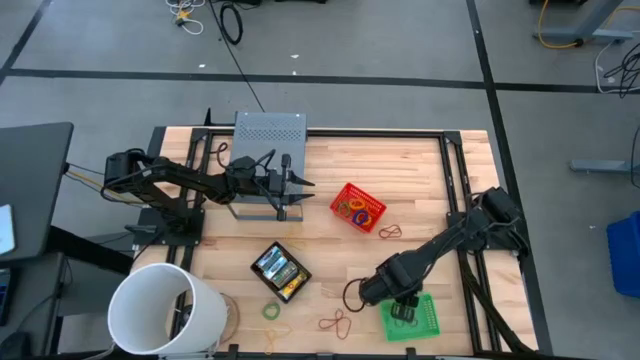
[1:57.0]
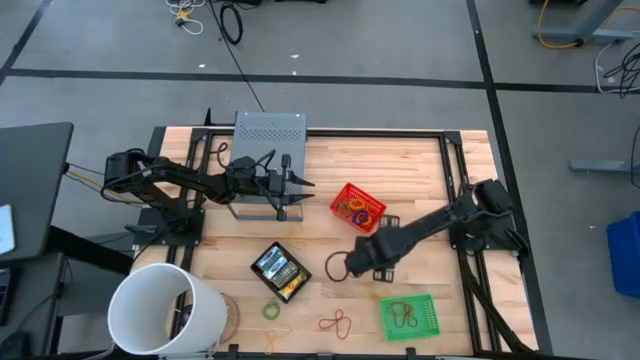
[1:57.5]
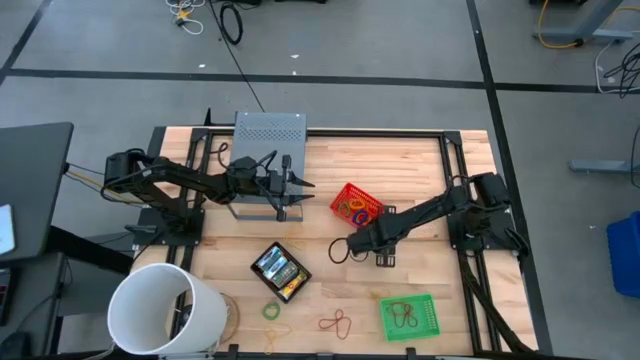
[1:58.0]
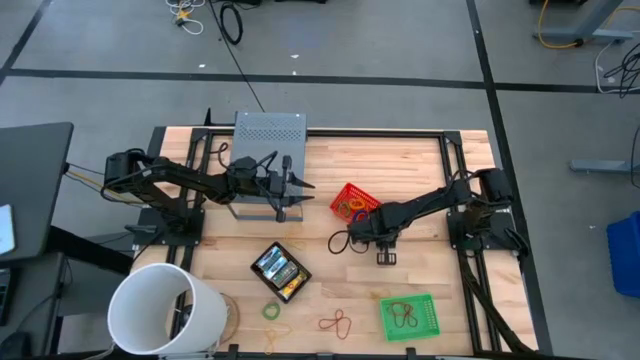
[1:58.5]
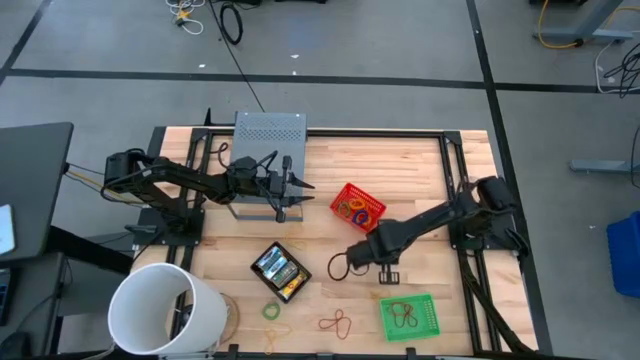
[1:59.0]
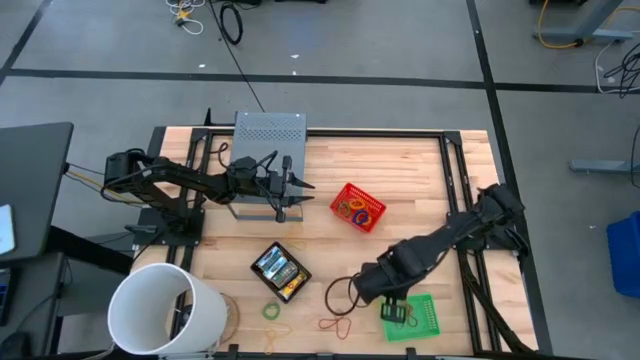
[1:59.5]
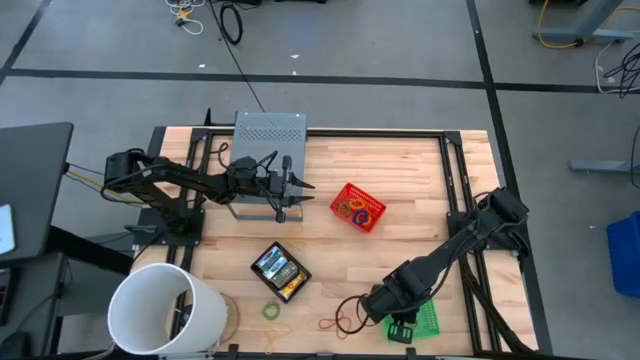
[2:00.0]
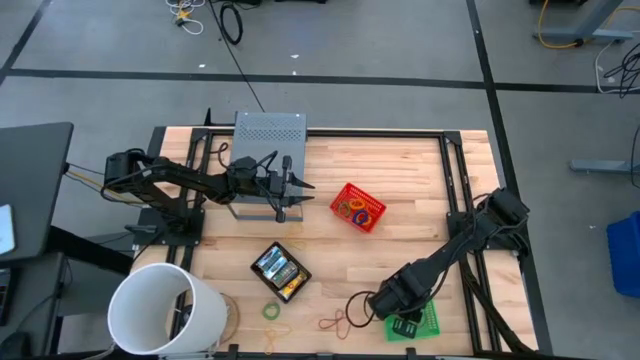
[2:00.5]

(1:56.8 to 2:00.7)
Task: Pick & Place Office Desk Supplies
Put the top red rubber band into the green basket

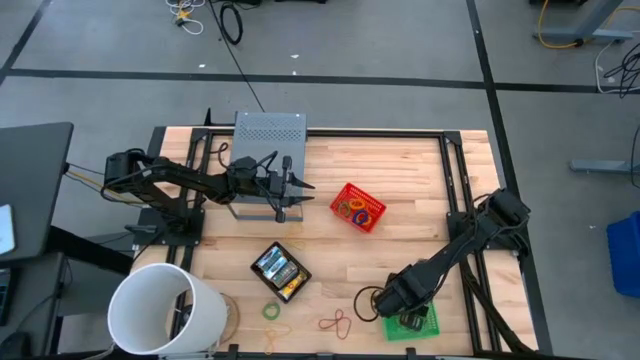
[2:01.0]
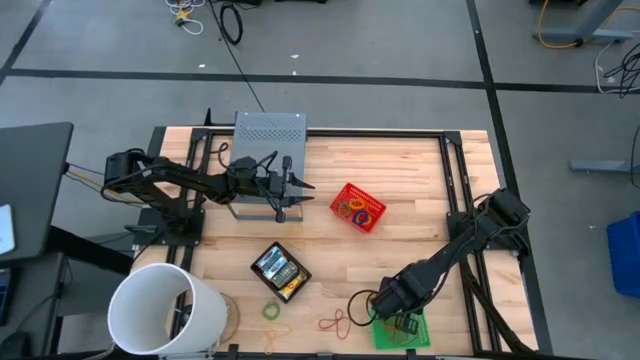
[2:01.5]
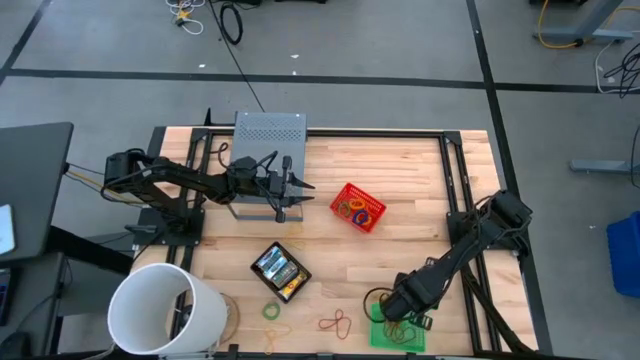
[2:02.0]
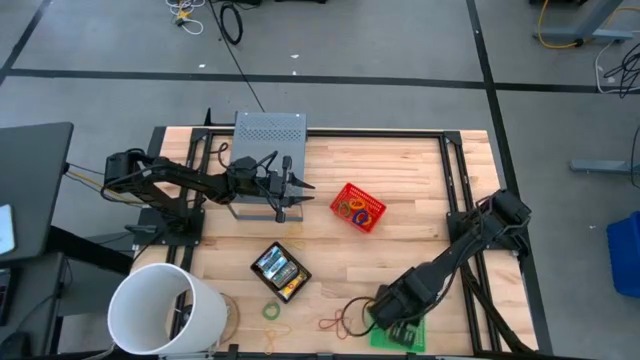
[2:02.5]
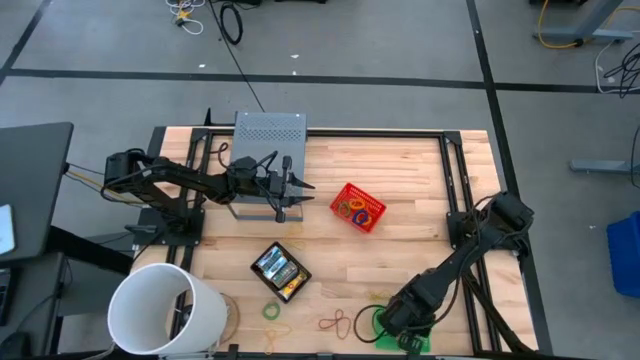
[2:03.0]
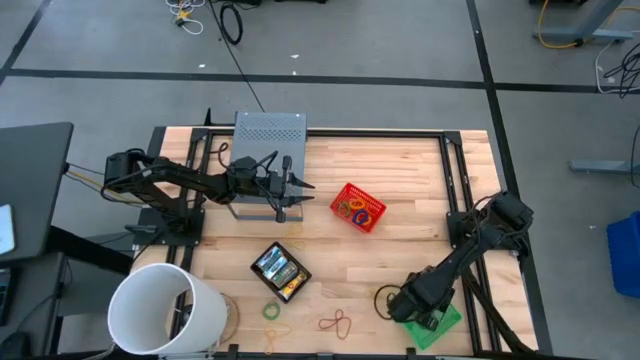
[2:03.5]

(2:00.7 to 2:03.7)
Adjust the green basket on the table

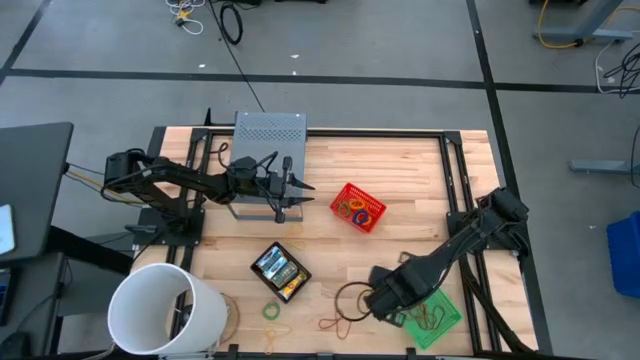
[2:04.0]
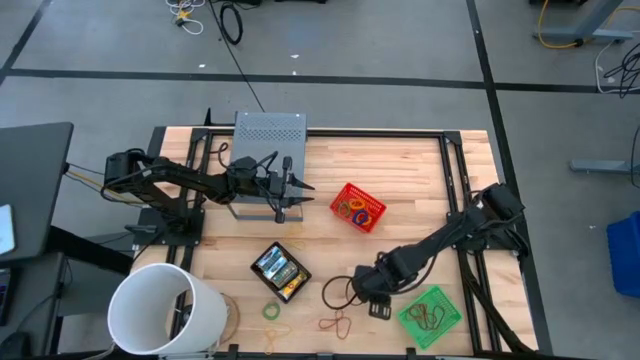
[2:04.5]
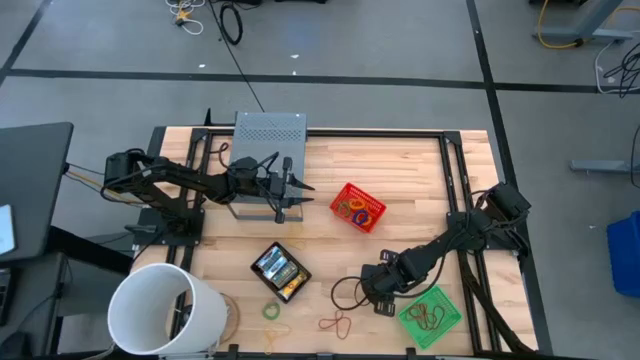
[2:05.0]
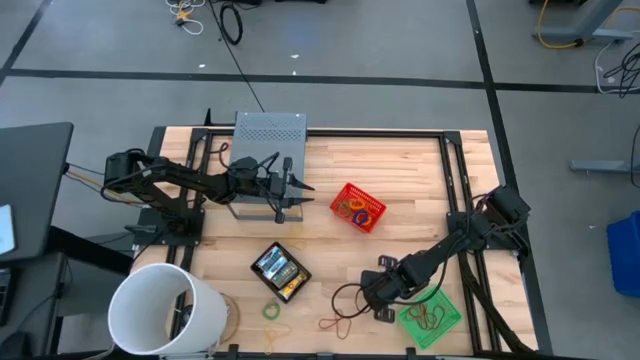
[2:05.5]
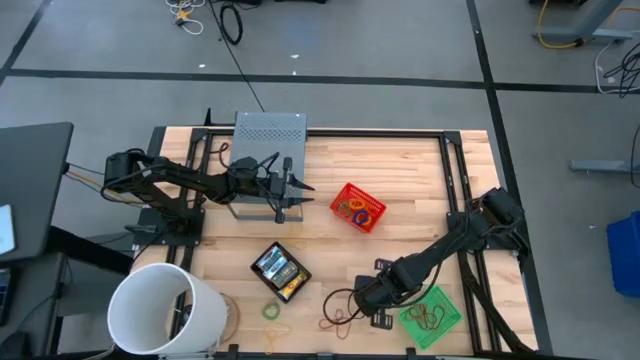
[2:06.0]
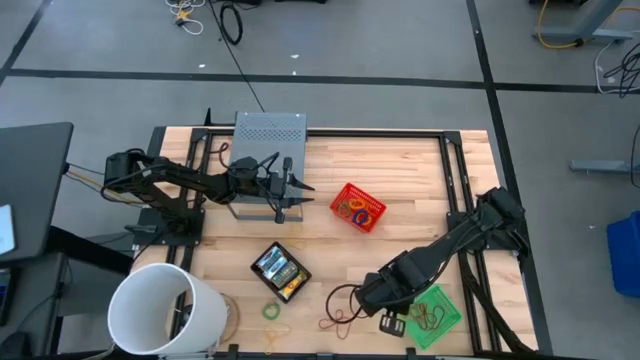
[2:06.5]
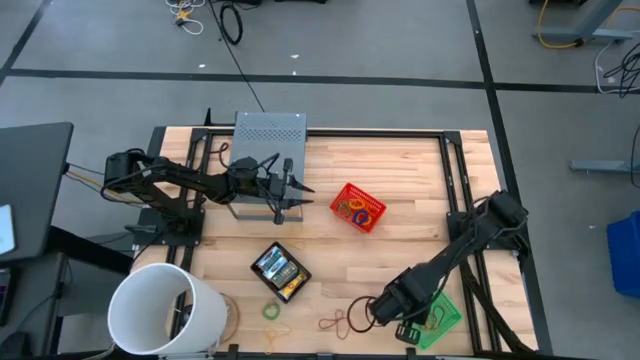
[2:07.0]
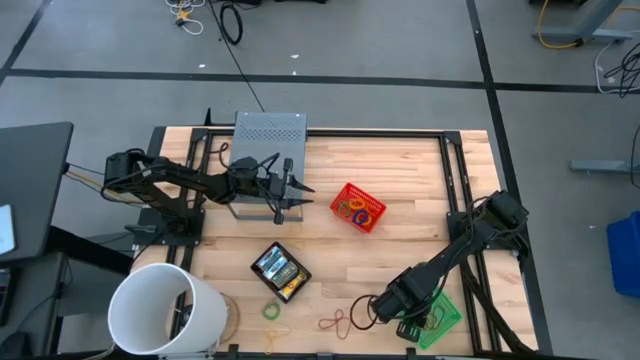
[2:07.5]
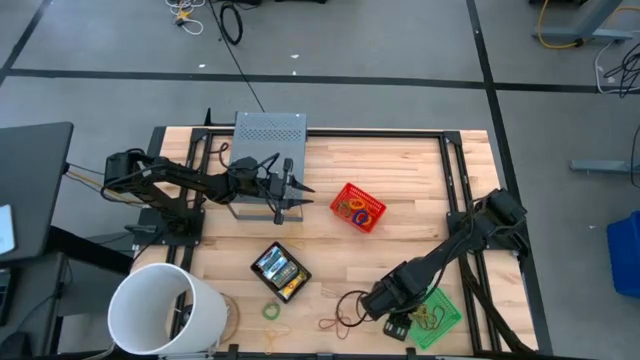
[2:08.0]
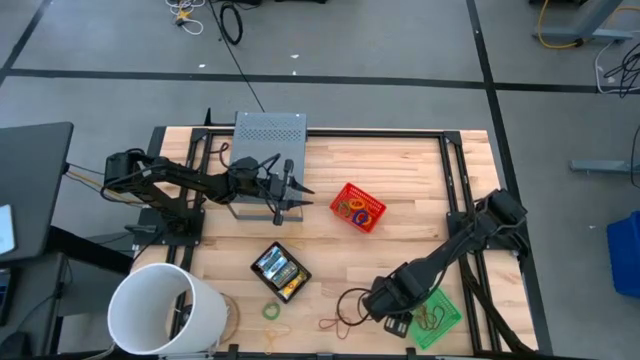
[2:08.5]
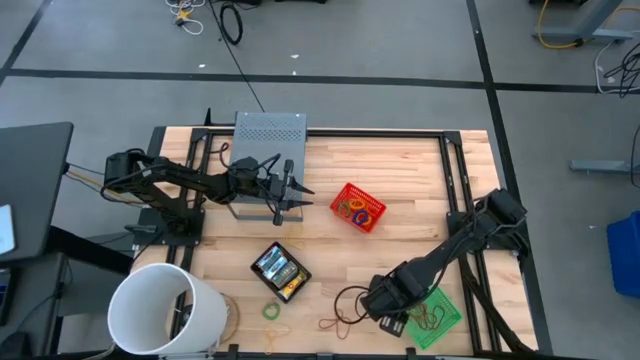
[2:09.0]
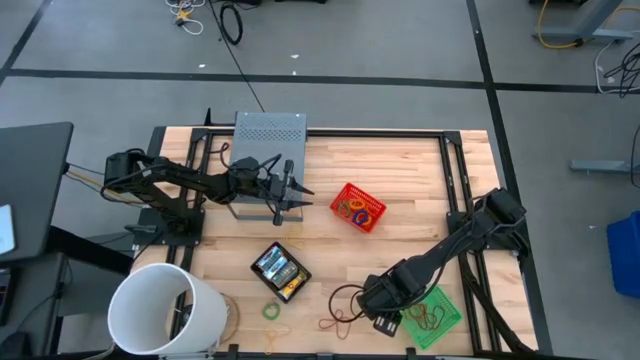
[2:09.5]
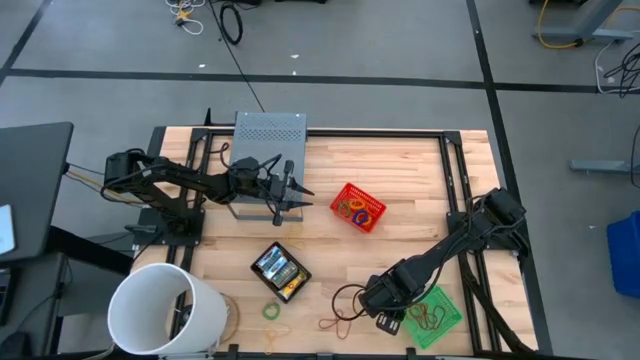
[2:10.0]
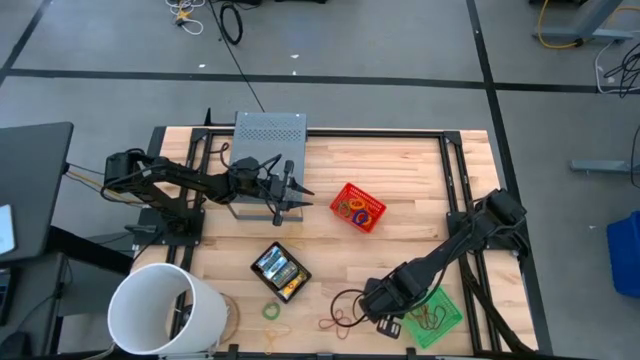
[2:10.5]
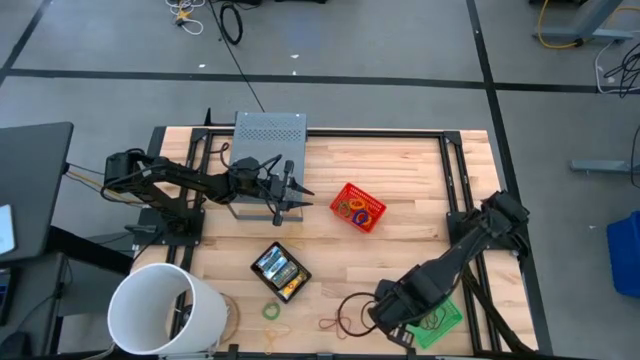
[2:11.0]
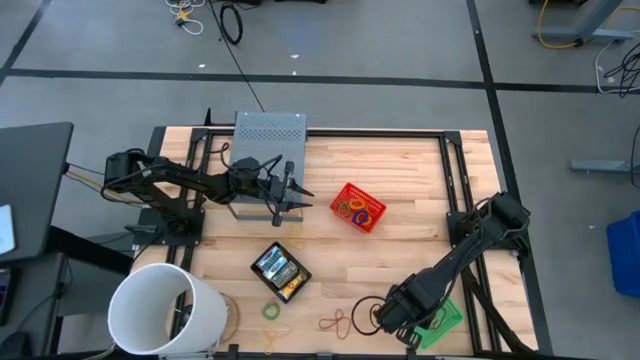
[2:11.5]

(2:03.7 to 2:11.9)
Put the middle yellow rubber band into the green basket

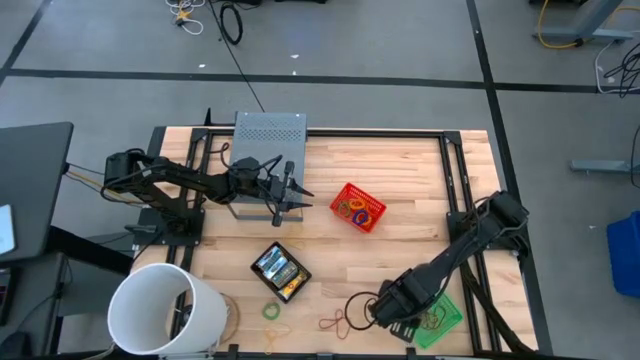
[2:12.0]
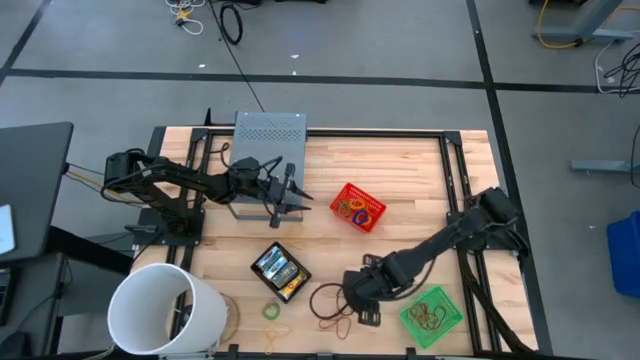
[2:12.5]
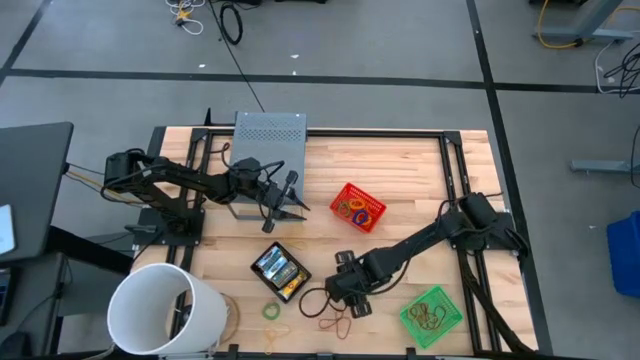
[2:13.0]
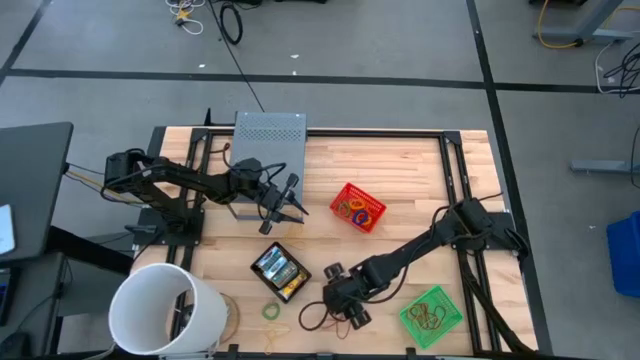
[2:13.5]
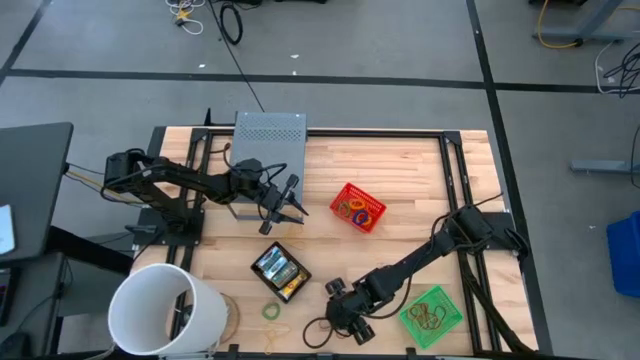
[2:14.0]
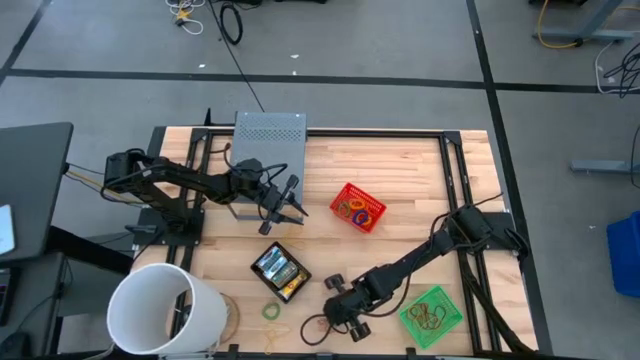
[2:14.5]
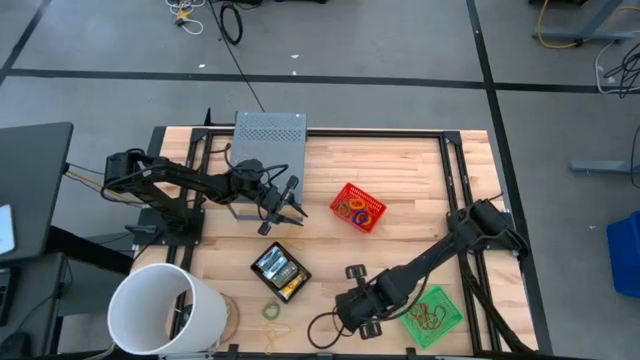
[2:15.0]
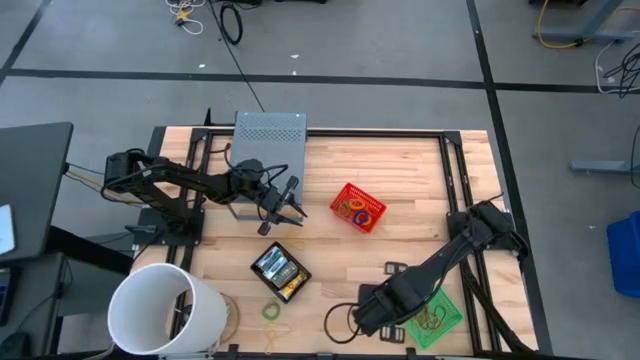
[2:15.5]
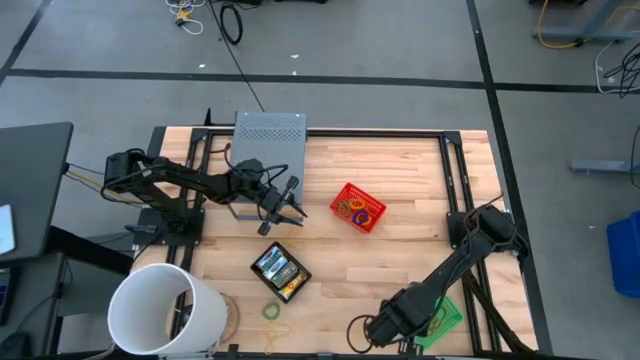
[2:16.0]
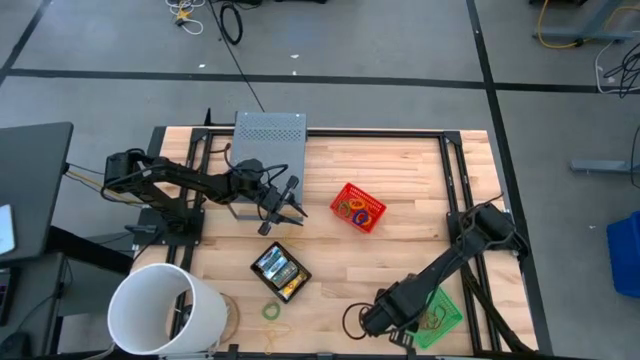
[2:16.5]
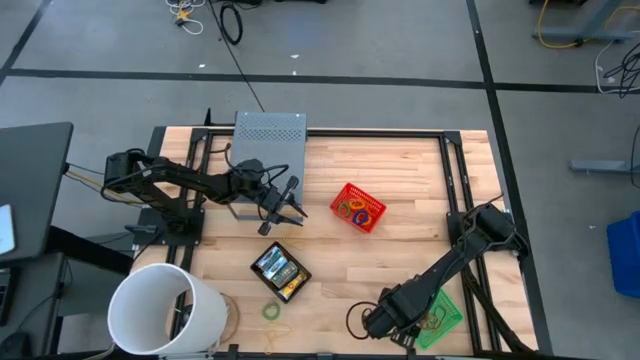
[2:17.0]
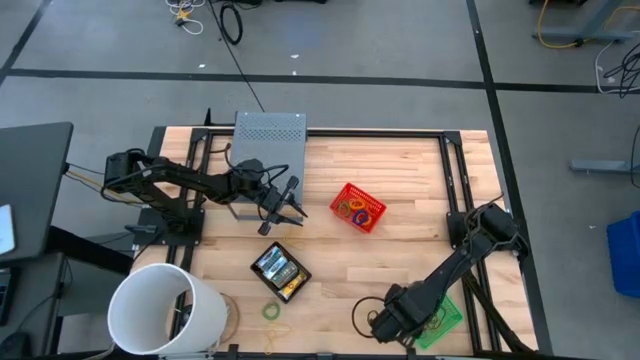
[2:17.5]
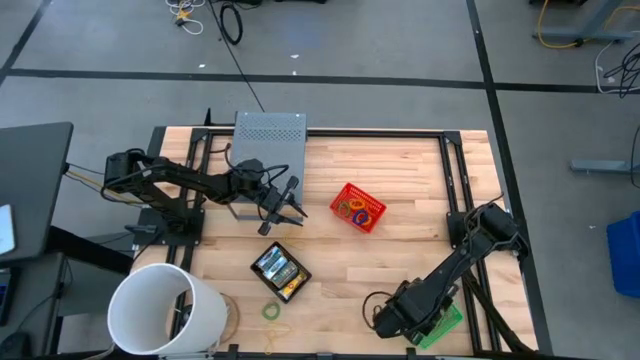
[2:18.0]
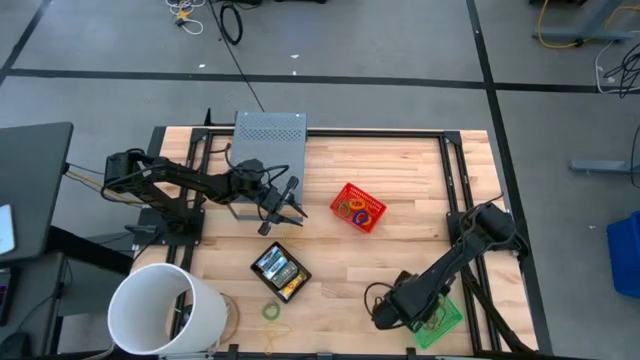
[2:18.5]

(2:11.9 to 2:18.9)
Put the red rubber band into the green basket
